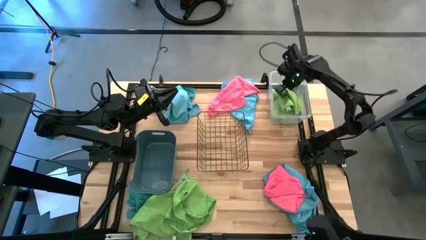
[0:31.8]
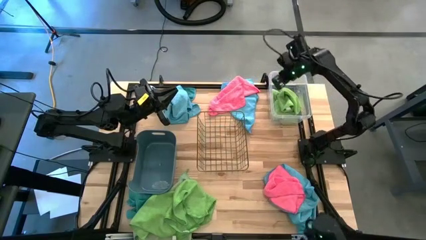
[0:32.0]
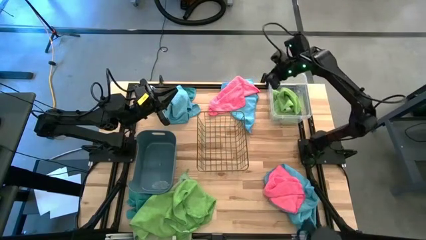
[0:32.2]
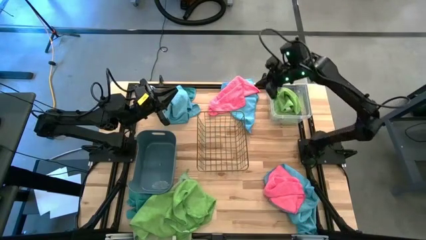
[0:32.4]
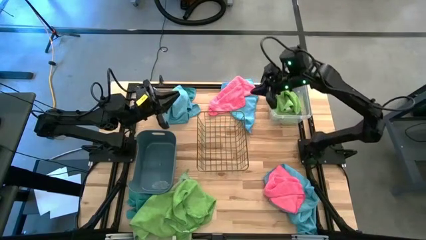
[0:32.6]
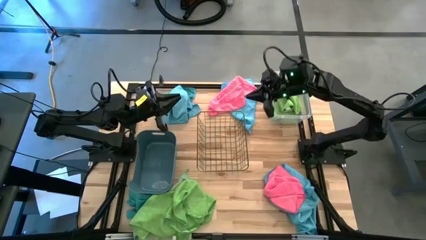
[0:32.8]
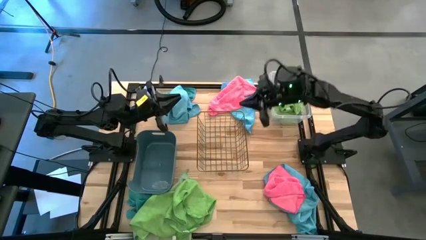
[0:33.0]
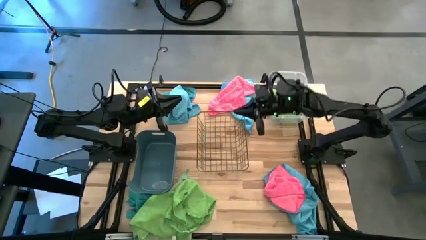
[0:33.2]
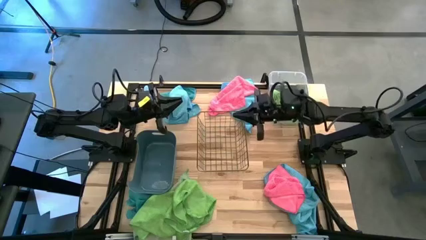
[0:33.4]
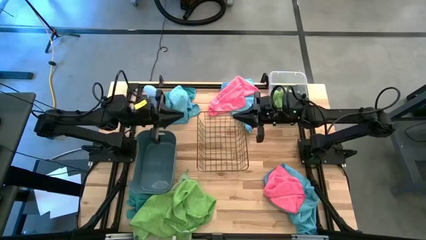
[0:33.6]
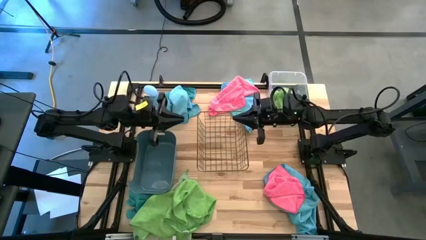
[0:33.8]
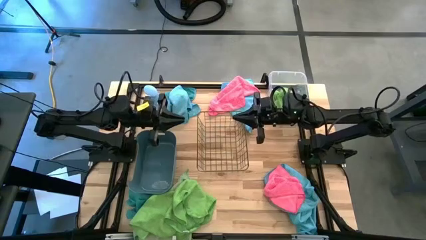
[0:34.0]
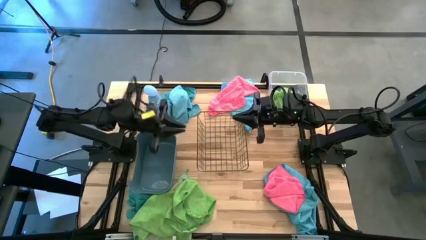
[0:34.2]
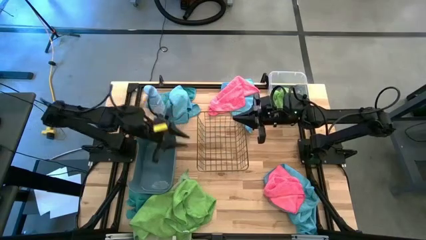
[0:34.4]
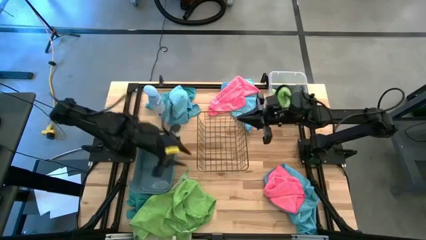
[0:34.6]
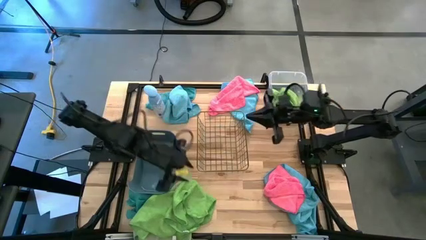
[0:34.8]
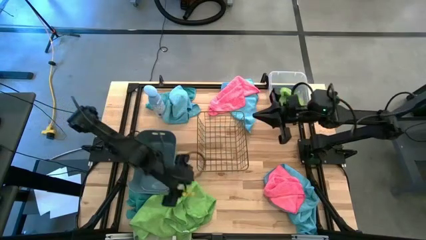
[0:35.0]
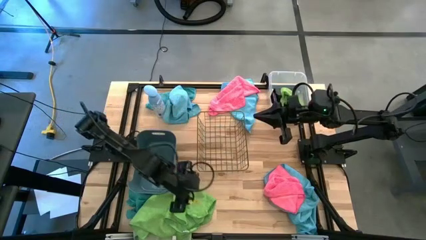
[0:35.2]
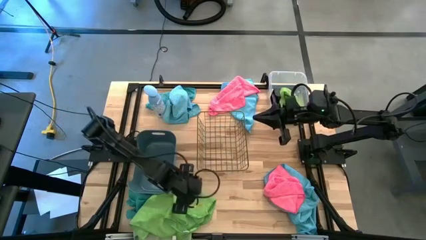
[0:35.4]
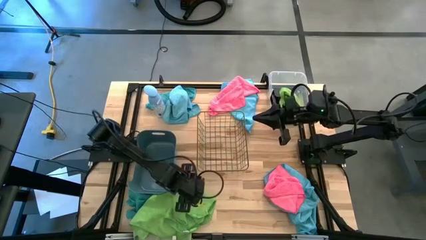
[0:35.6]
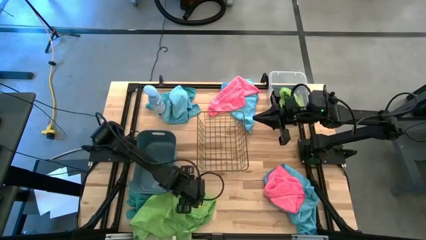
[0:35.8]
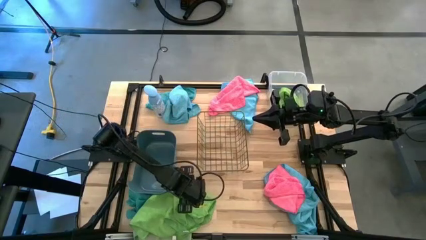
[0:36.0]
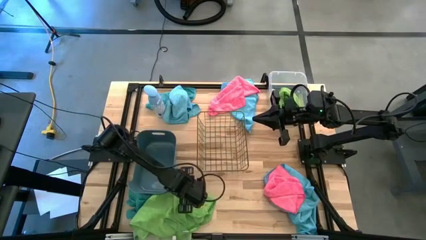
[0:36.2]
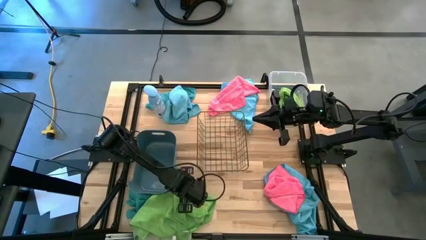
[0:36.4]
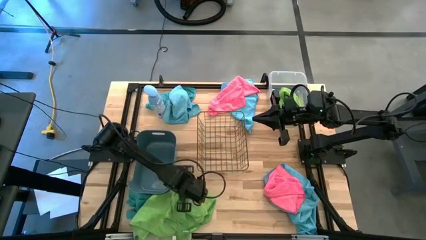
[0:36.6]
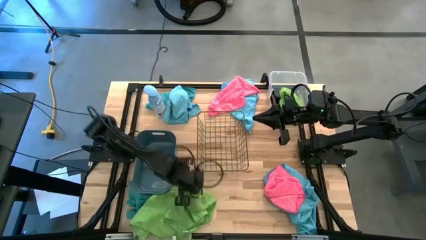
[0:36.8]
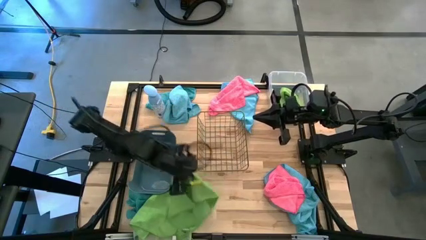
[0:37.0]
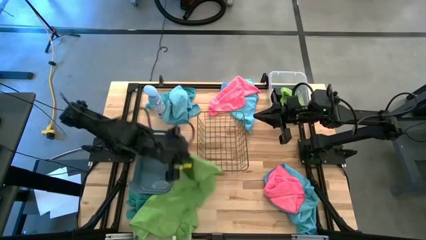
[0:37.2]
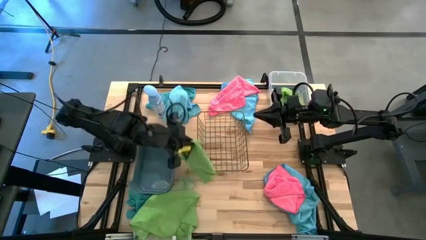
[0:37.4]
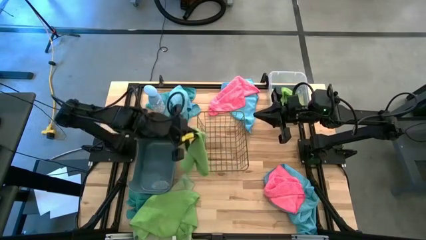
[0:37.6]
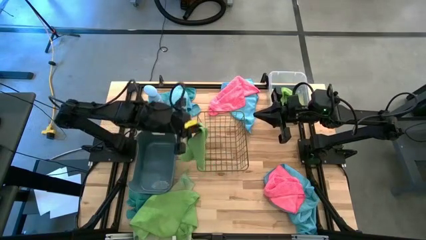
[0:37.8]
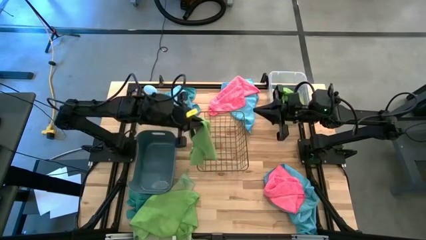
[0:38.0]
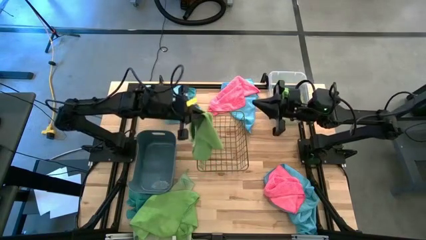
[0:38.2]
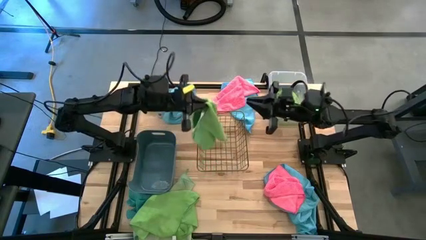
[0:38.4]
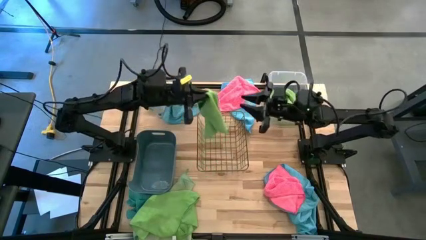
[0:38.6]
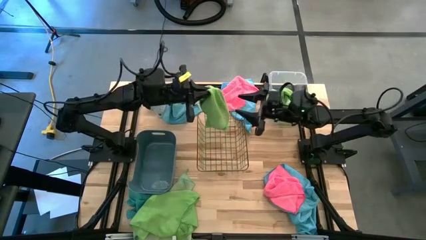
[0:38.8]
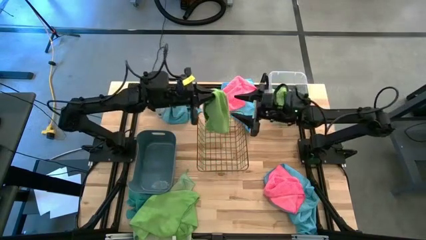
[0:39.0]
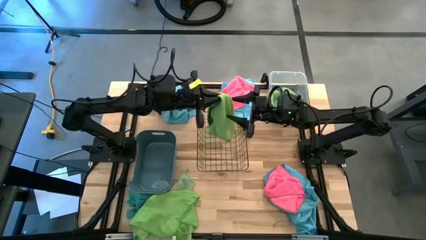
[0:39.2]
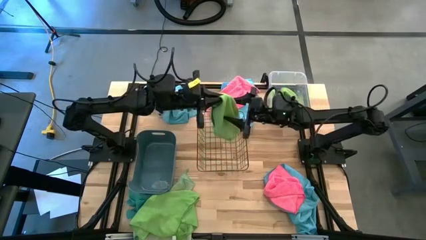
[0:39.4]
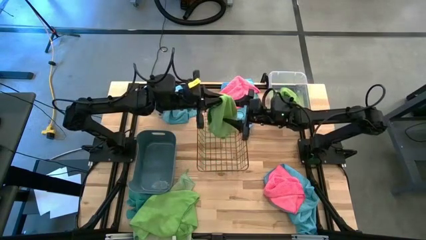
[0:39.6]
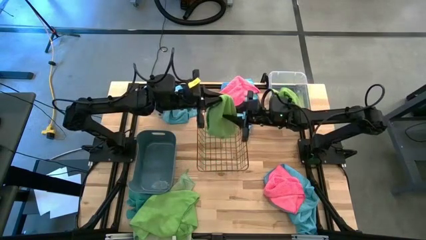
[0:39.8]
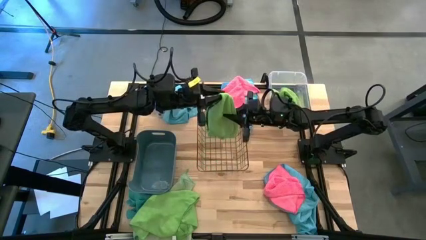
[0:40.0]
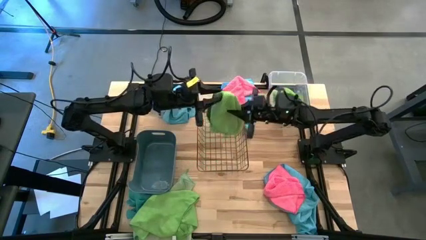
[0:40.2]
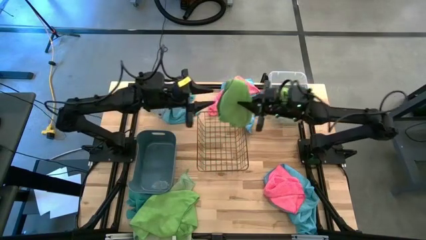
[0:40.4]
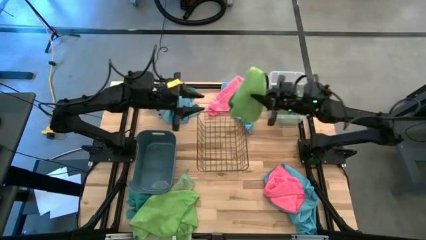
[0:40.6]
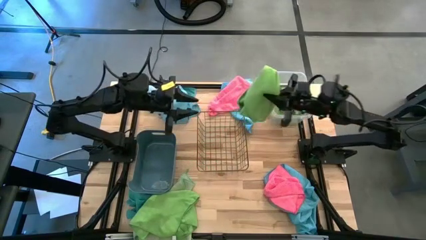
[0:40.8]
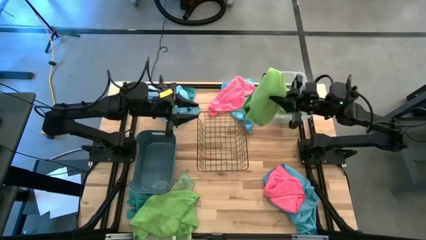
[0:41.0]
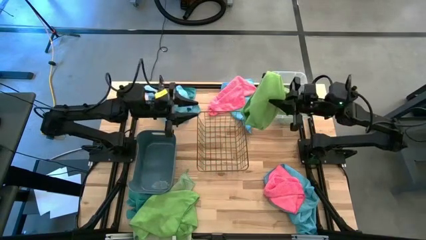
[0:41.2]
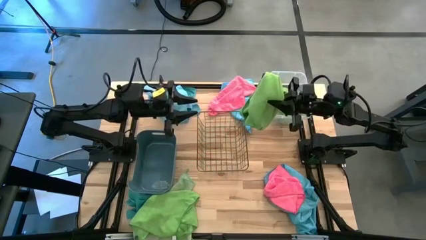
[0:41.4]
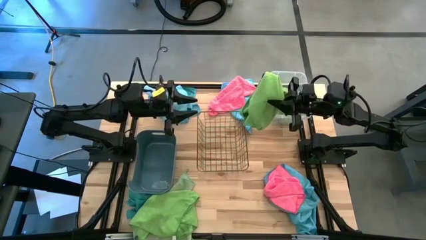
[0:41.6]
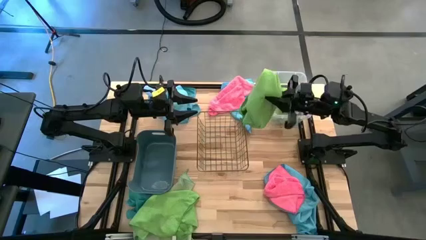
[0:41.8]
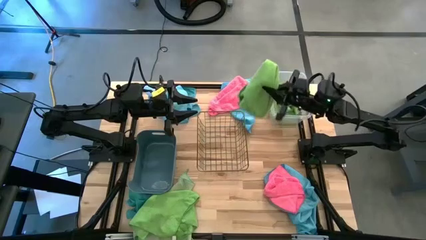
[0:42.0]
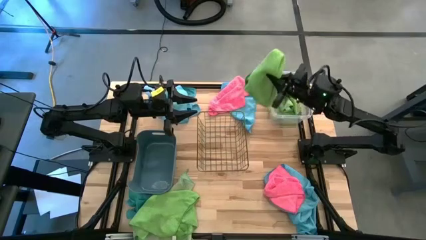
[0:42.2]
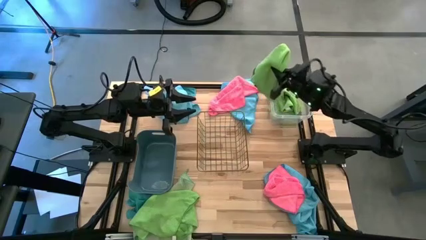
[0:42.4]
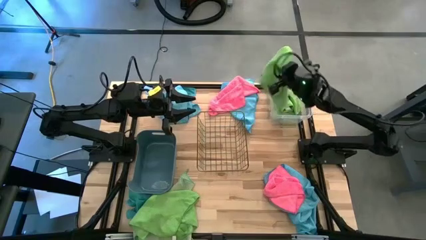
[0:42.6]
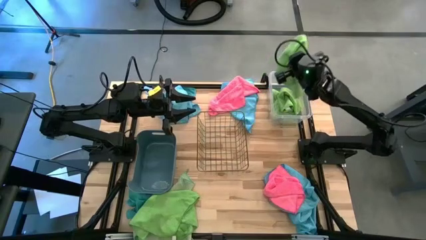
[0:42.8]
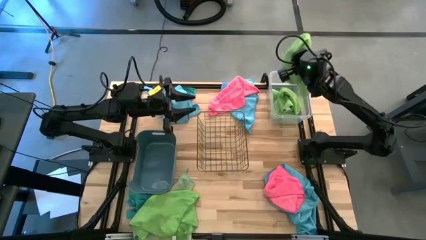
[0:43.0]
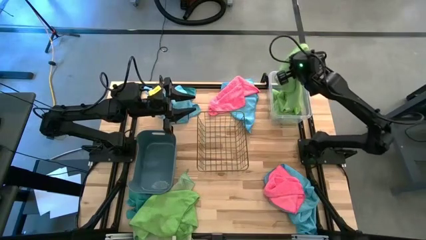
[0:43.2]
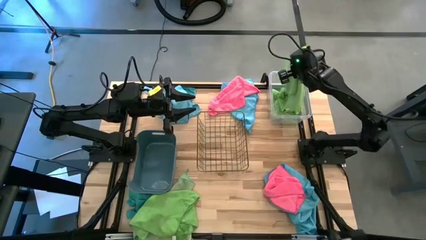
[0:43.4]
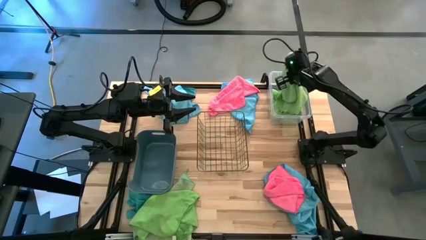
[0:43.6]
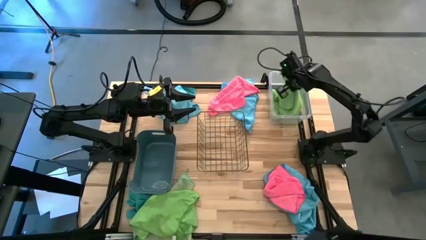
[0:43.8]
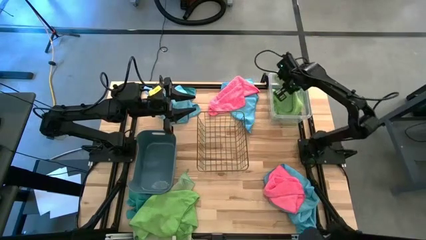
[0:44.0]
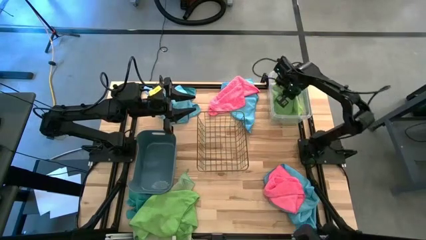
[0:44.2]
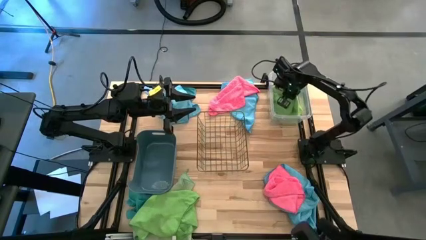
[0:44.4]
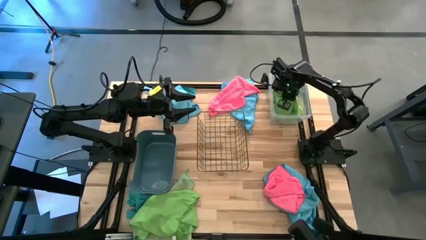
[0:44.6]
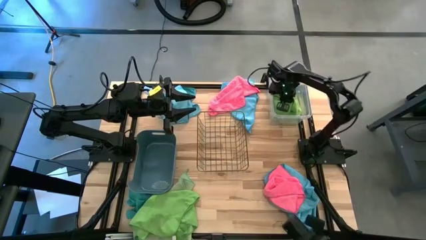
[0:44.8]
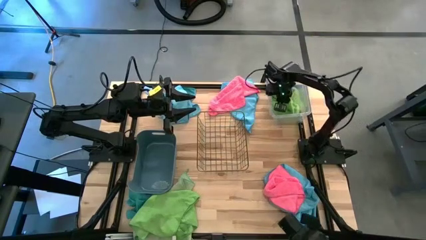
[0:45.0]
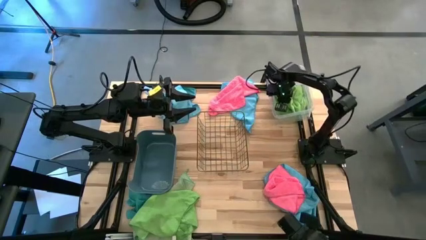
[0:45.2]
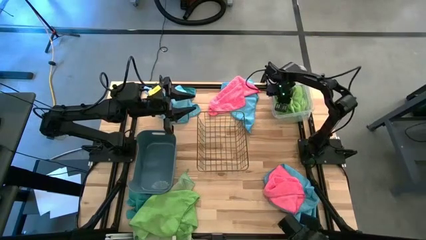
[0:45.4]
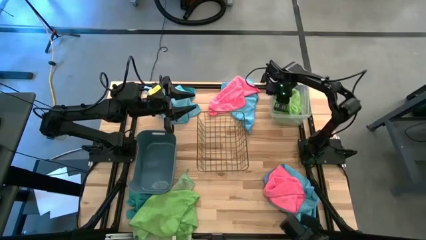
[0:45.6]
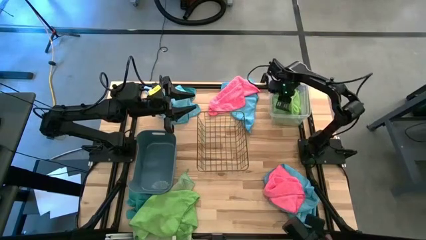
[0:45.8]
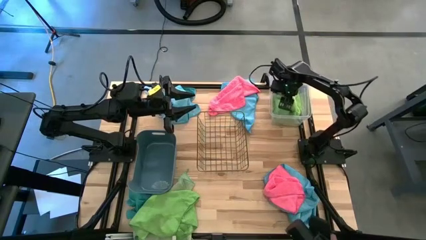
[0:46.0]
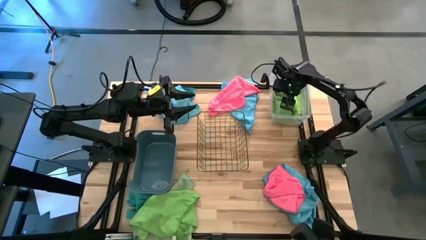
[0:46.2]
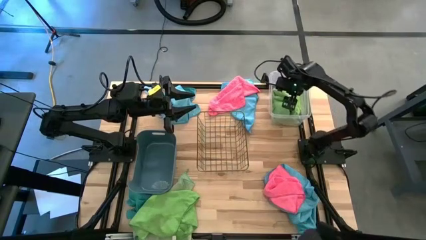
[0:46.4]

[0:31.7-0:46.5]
Task: Sort microfiber towel by color & place in baskets
Put the green towel into the transparent bin

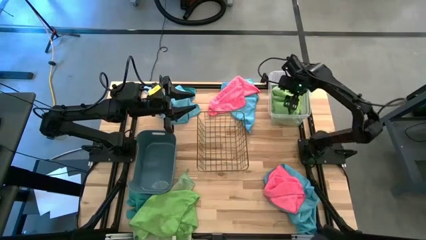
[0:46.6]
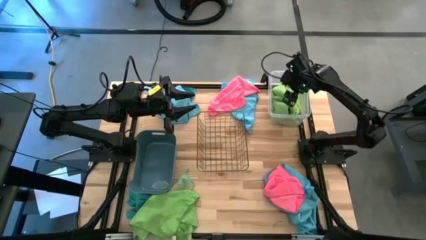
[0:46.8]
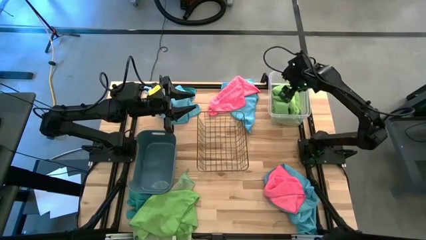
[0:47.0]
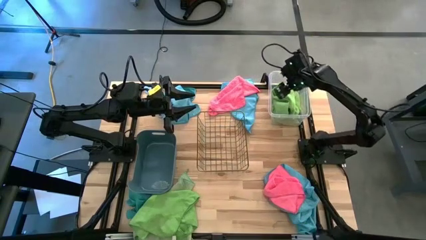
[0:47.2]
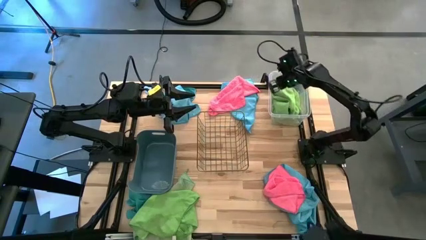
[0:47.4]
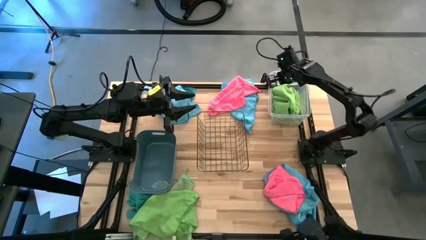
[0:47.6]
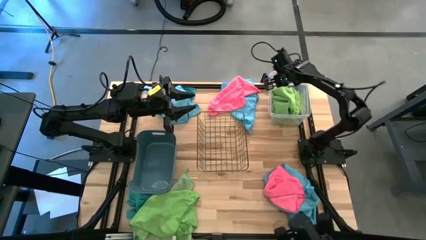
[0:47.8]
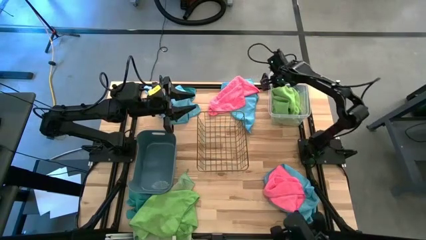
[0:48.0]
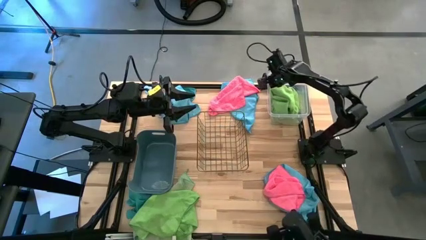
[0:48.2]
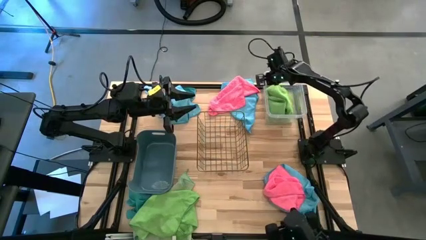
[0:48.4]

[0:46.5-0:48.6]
Adjust the transparent bin on the table
